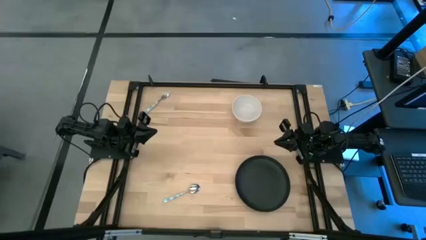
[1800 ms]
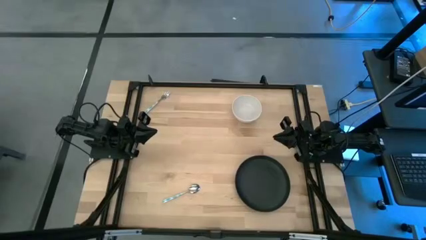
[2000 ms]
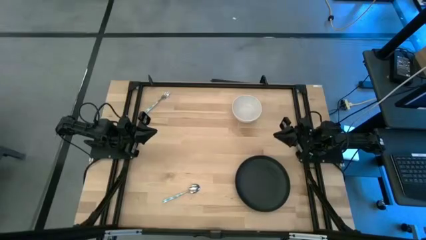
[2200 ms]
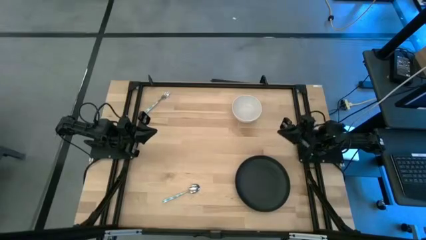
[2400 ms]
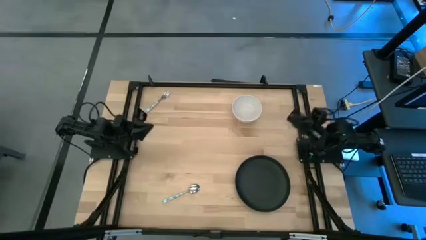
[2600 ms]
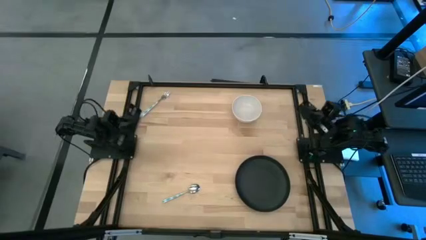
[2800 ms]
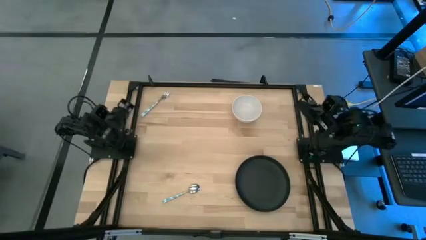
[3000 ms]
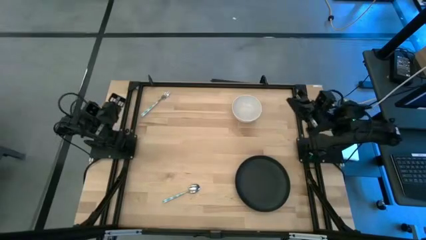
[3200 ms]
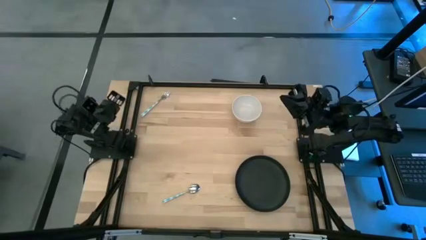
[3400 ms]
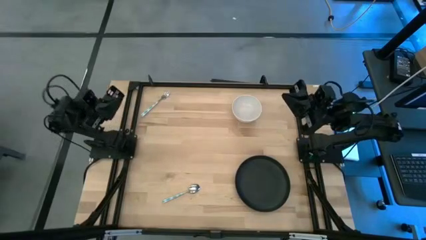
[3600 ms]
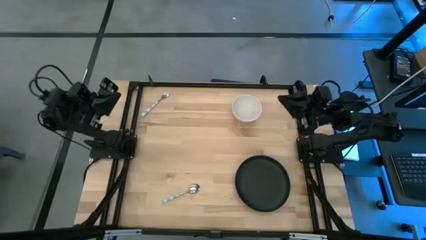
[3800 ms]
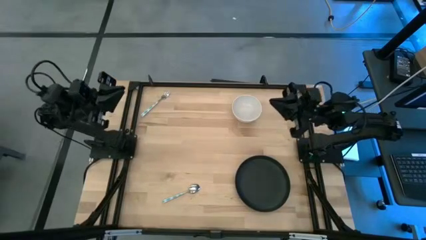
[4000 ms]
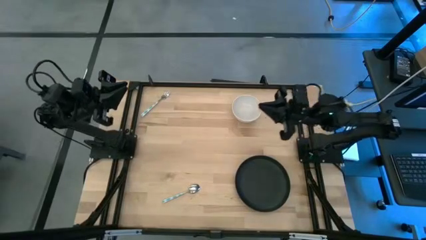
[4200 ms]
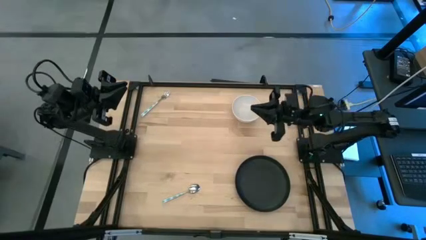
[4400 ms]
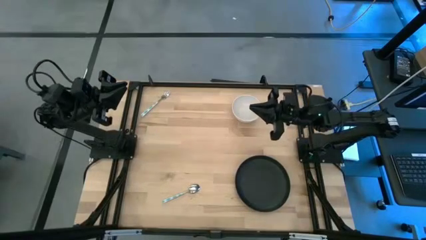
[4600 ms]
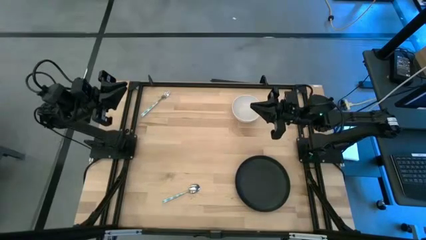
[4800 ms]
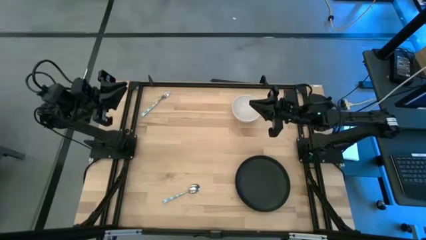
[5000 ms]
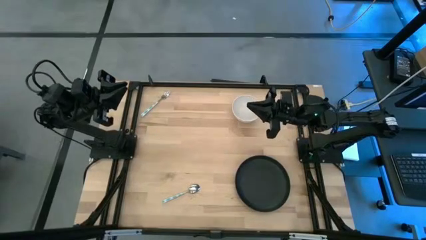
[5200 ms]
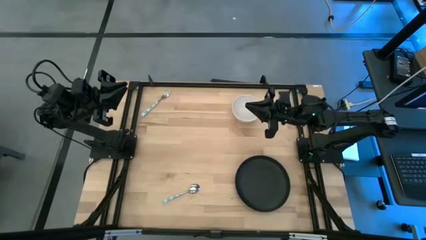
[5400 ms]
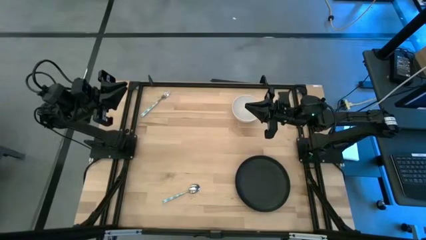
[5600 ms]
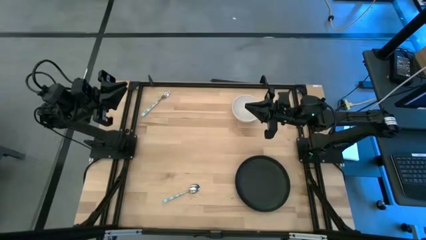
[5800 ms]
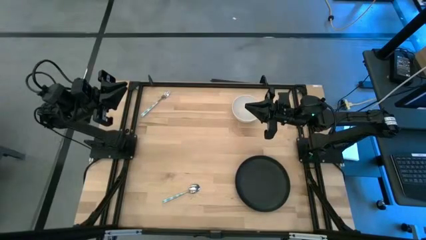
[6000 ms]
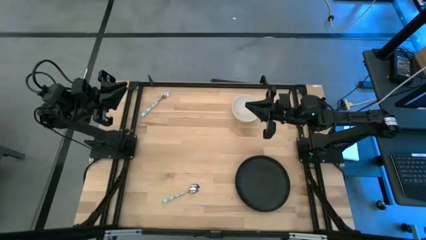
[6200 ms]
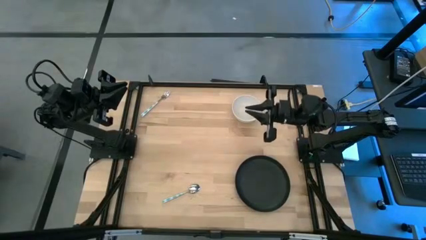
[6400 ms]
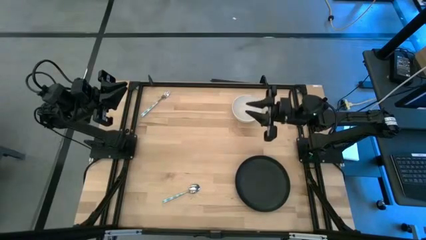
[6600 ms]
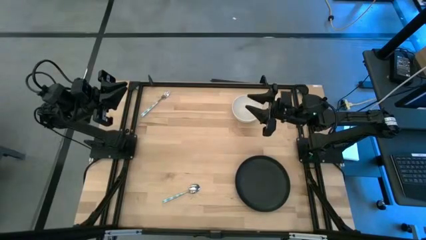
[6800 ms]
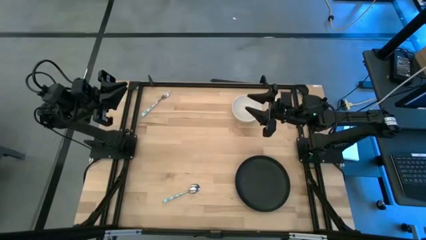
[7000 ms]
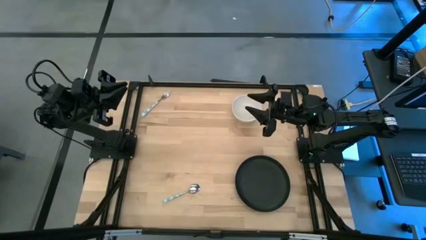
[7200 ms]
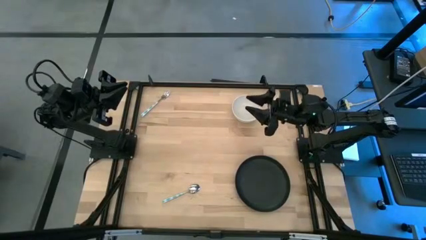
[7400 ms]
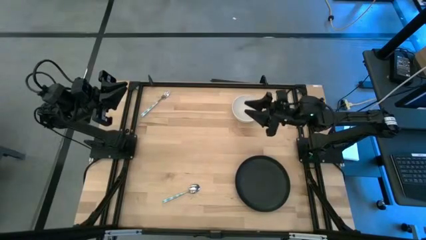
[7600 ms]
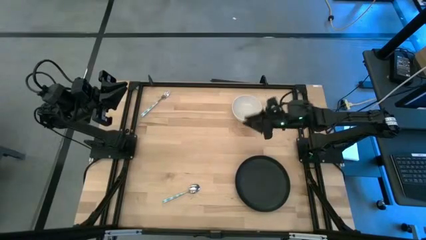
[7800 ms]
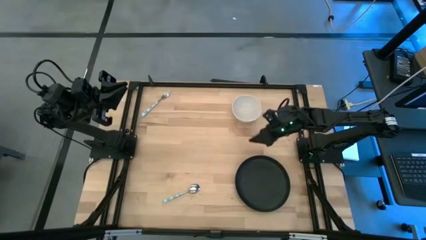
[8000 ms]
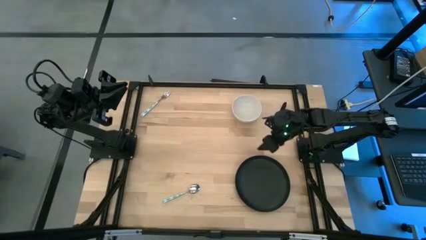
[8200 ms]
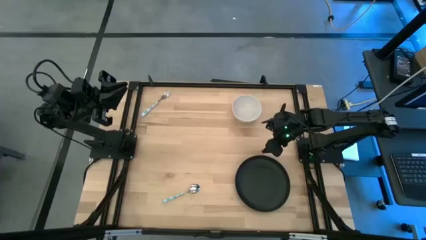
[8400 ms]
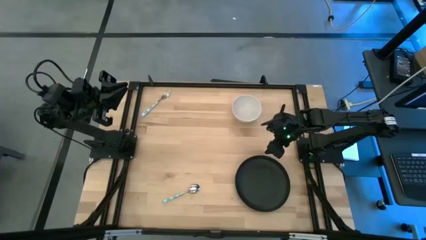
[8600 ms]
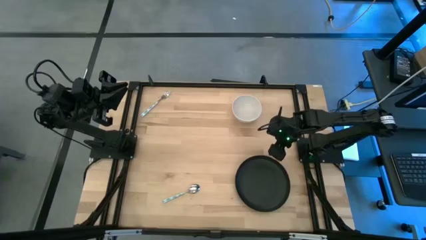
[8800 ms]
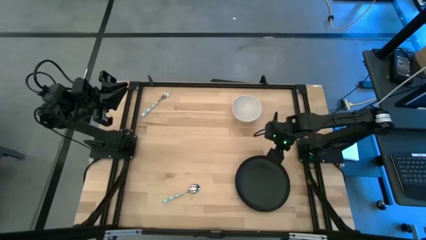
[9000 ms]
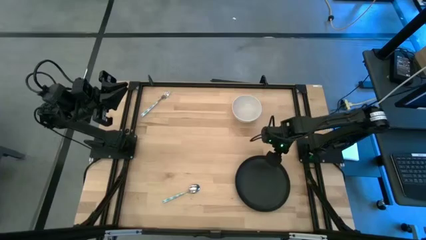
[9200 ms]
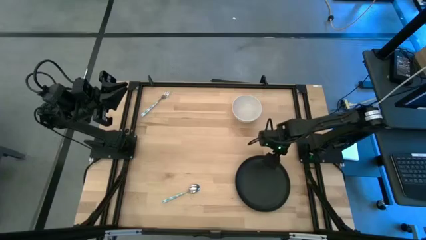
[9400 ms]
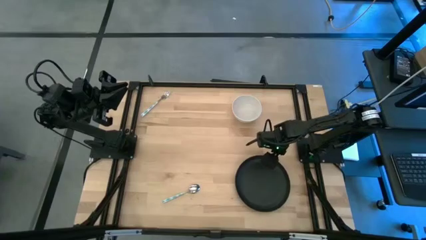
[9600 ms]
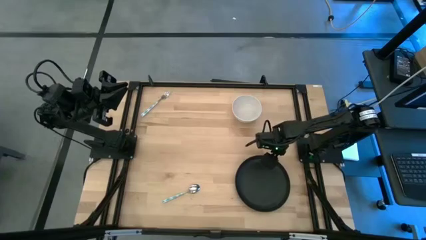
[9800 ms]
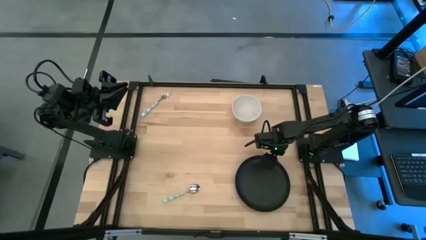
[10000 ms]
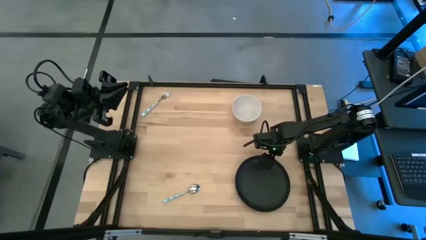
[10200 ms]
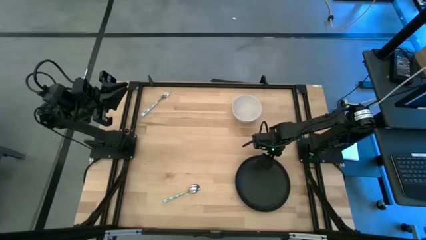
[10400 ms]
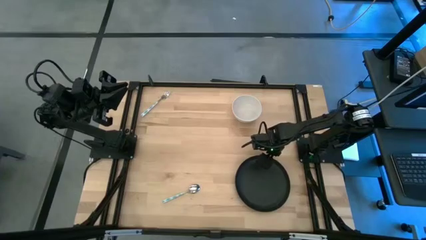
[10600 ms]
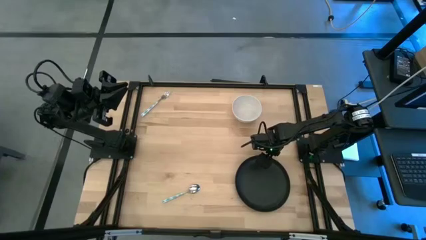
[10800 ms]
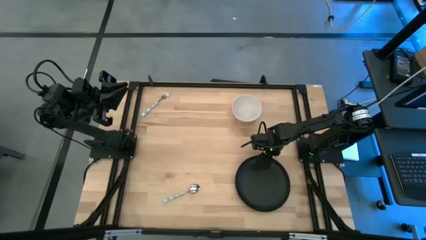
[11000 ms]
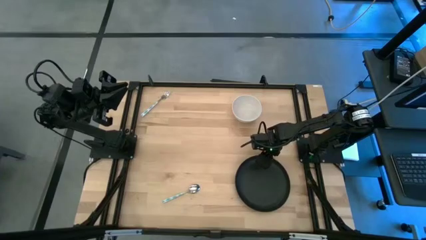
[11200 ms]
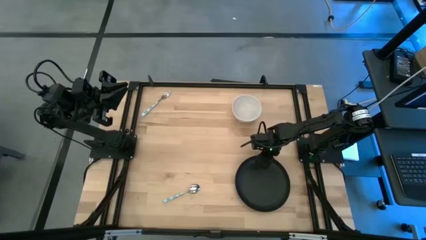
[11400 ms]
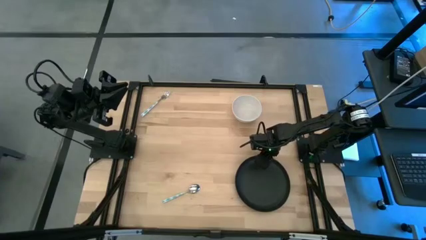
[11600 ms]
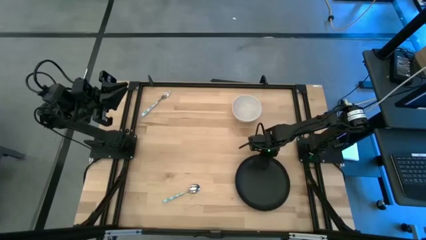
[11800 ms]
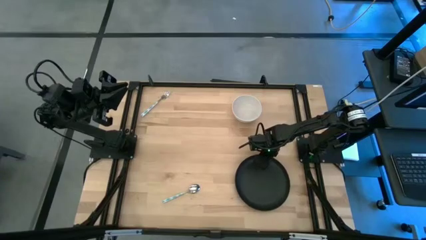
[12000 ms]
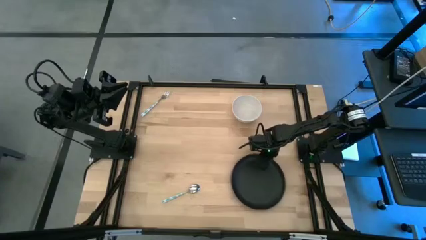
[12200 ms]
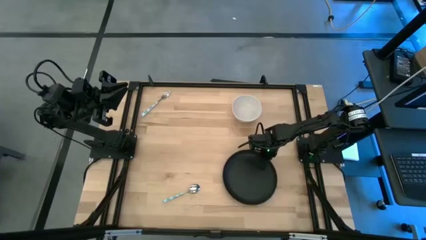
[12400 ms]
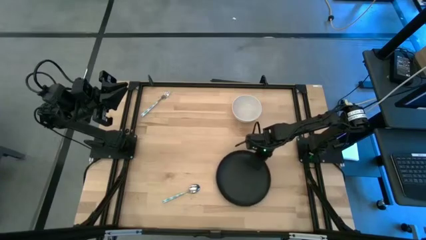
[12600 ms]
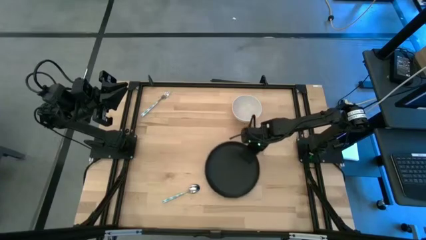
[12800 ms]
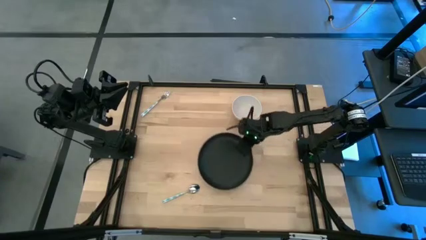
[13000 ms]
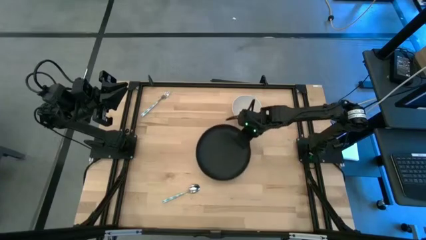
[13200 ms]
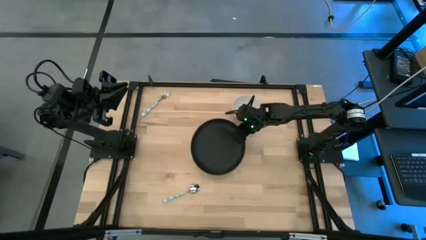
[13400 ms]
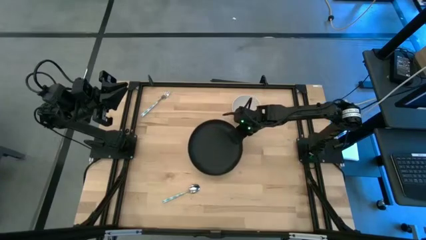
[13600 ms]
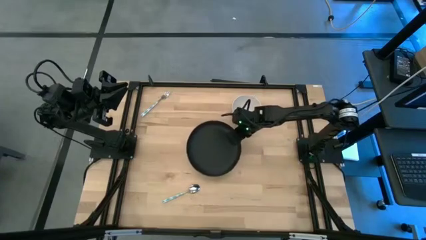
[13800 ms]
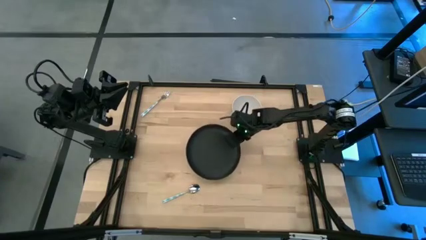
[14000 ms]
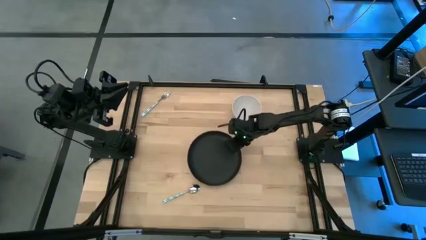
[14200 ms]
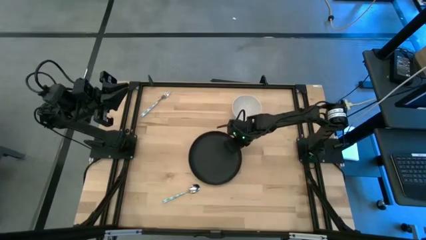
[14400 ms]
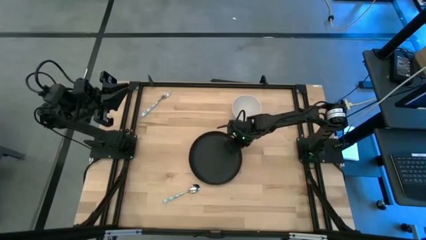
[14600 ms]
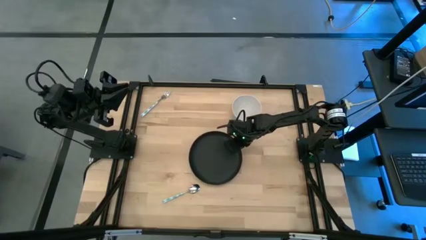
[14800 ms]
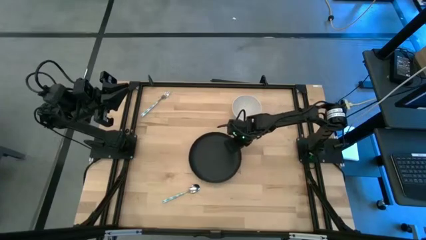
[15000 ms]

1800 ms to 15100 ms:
Task: Set table place
Move the black plate to the center
